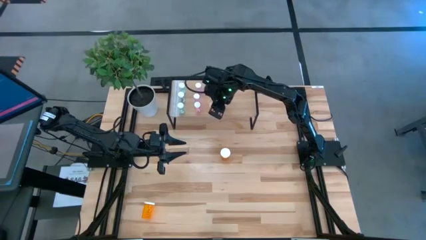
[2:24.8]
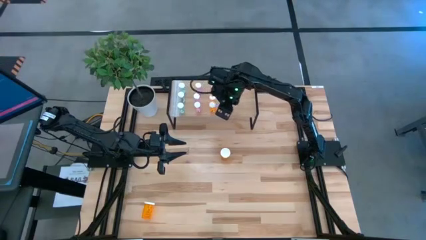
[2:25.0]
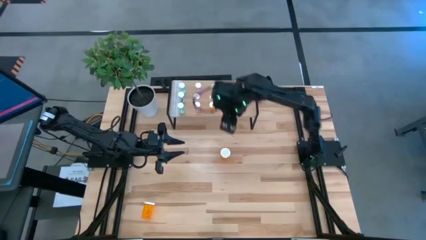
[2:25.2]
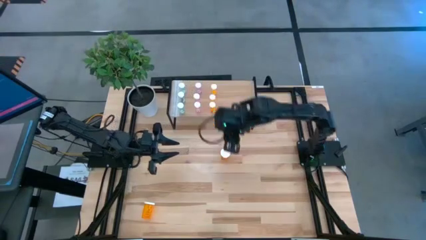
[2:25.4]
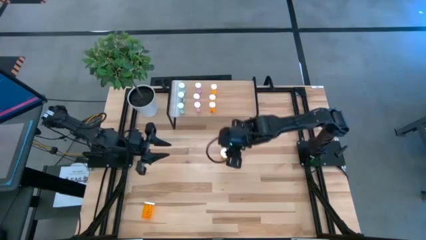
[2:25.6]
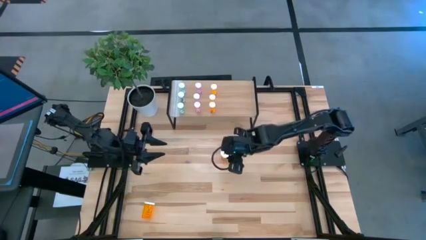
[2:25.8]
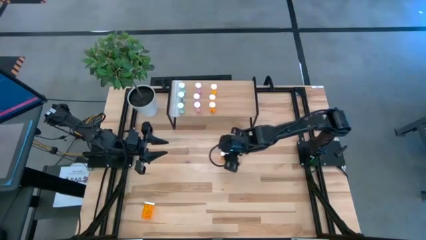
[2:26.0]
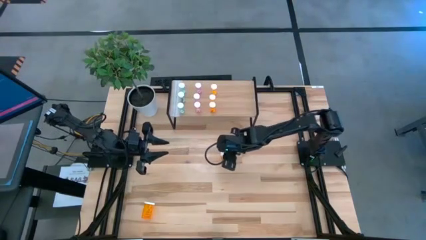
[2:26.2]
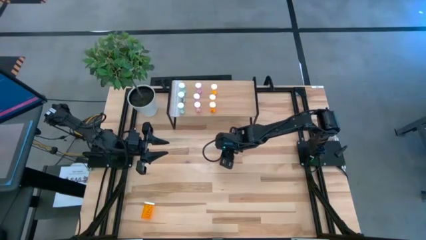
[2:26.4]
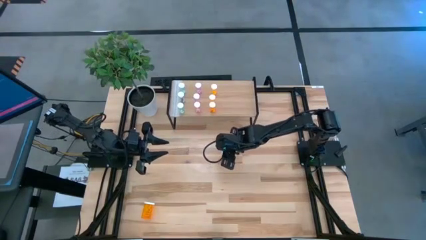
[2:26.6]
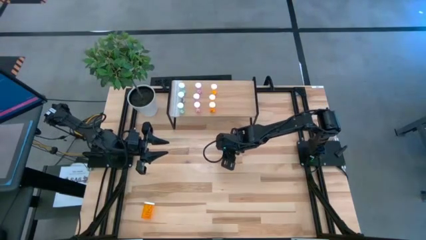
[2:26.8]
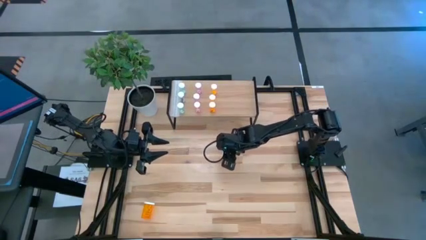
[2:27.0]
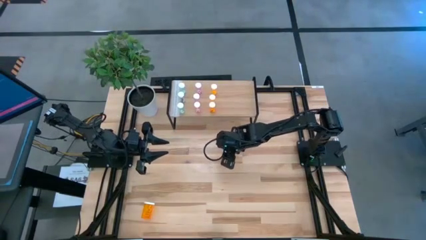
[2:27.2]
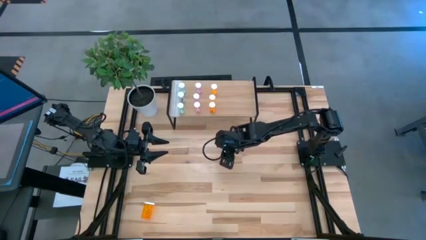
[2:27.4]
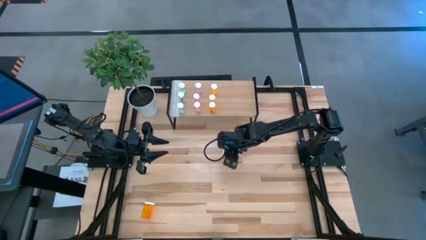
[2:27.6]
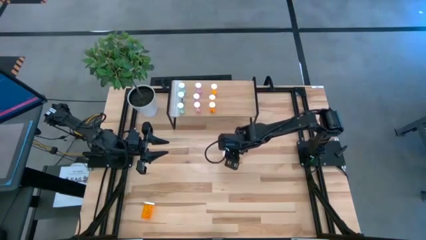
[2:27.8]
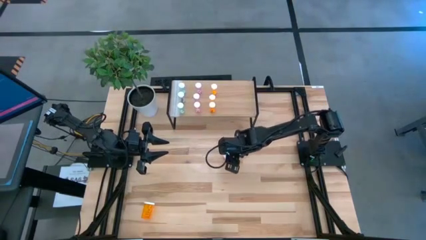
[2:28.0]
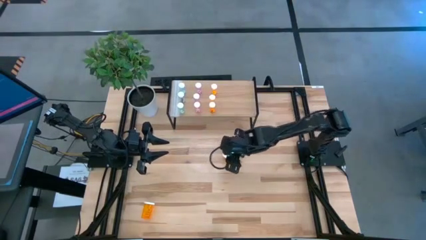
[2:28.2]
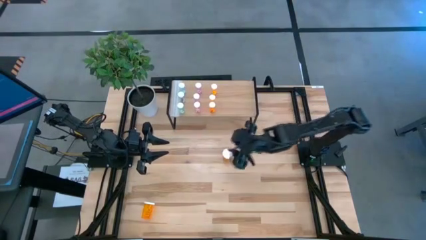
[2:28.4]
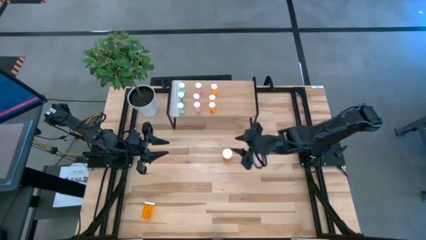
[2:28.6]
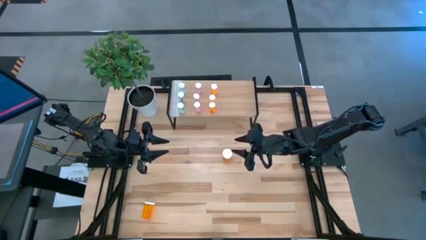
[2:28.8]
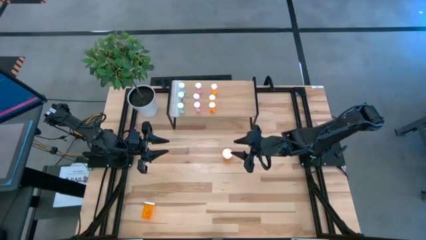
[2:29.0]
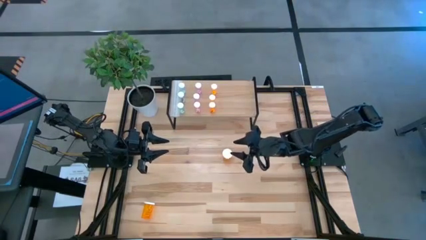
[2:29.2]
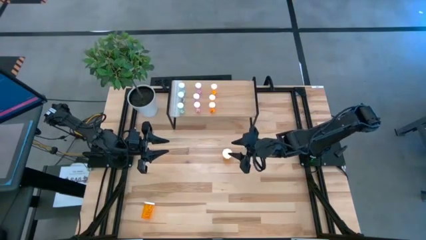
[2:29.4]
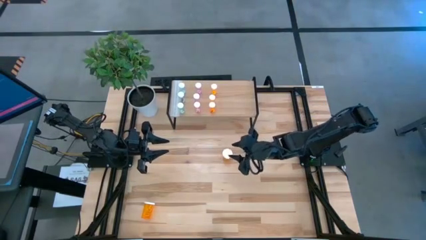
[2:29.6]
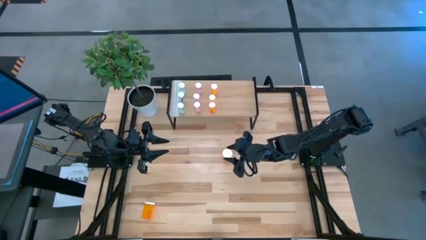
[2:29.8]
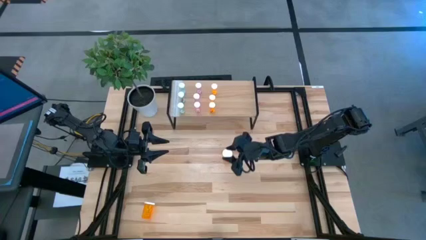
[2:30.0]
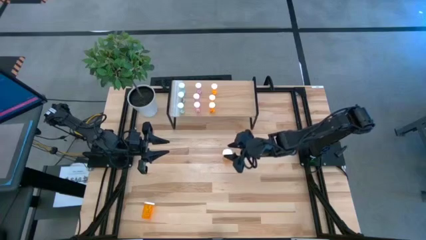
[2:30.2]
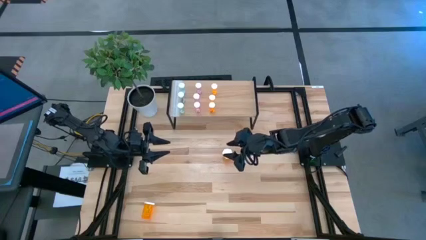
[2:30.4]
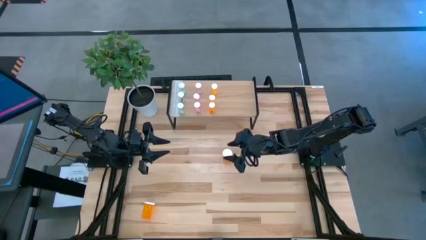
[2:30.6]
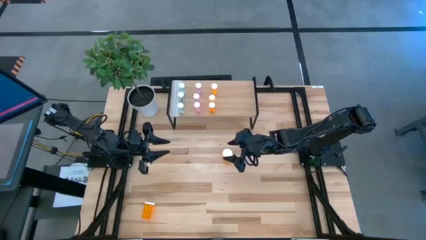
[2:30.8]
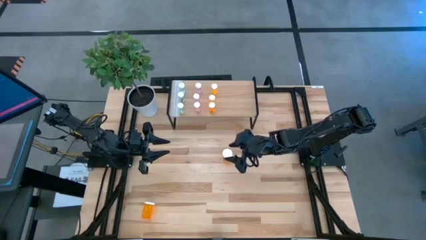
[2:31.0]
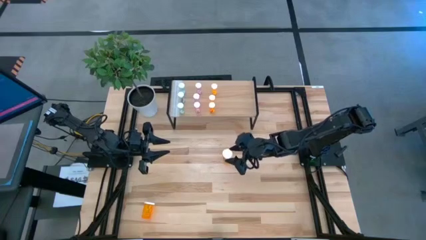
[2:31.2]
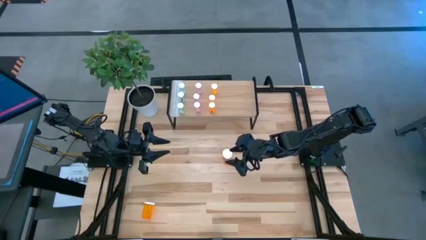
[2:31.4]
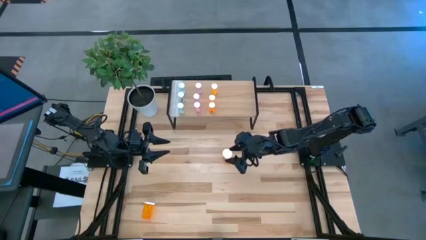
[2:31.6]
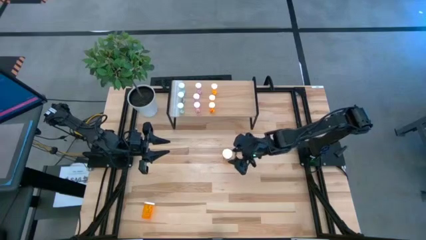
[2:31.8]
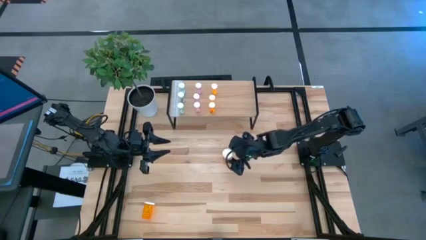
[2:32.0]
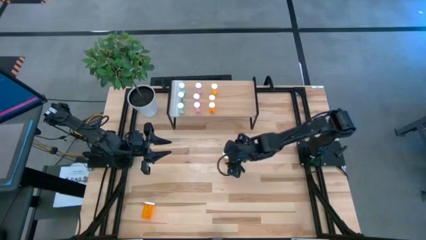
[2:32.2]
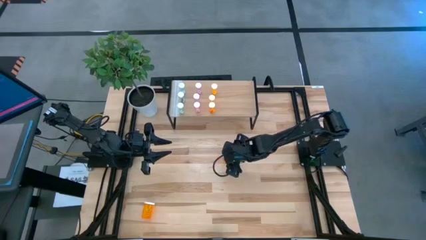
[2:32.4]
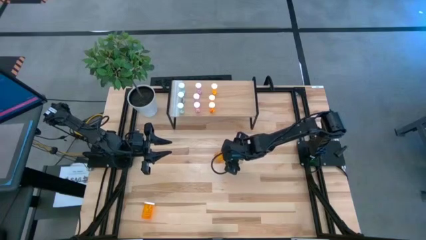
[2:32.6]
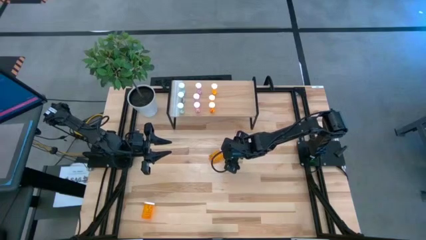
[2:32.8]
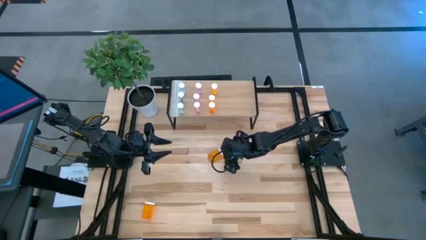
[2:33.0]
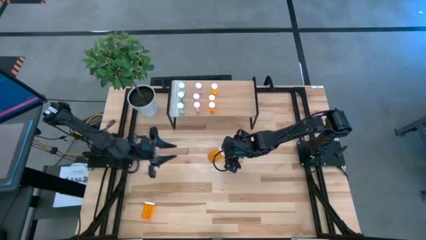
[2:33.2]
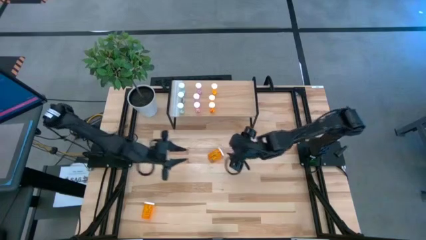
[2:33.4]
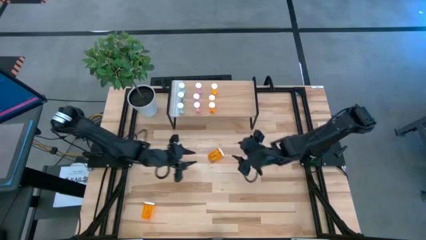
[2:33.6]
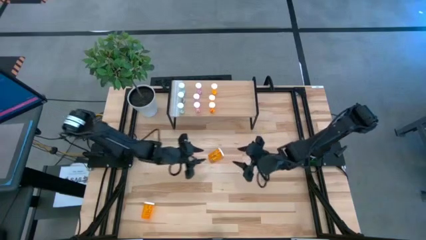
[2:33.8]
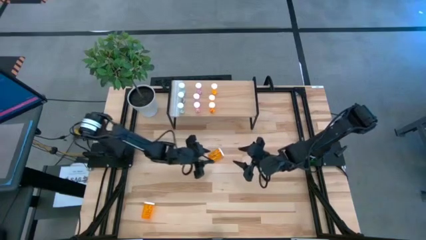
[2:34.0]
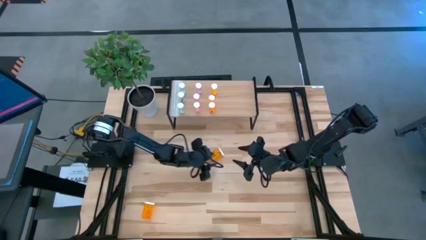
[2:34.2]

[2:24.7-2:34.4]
Task: Pick and place medicine bottles onto shelf by color
Put the top large orange pill bottle on the shelf

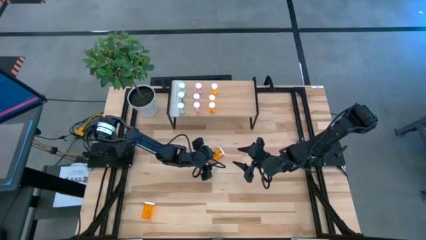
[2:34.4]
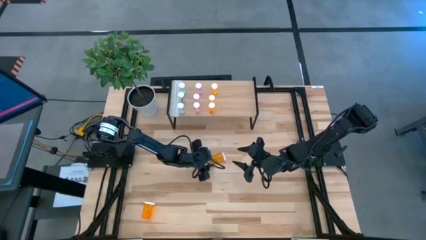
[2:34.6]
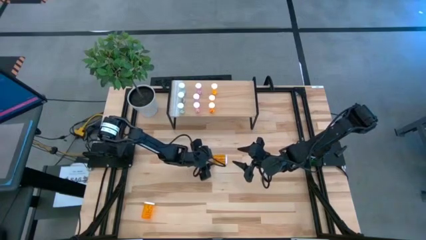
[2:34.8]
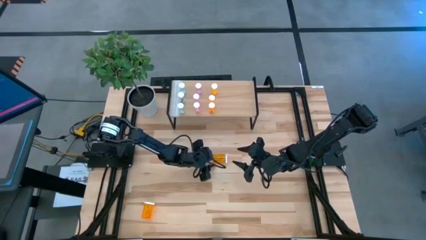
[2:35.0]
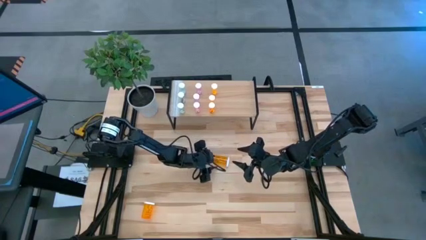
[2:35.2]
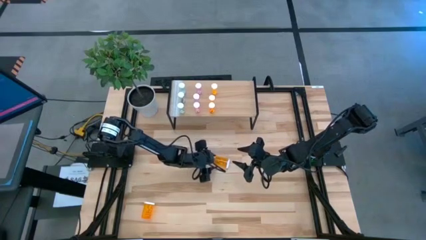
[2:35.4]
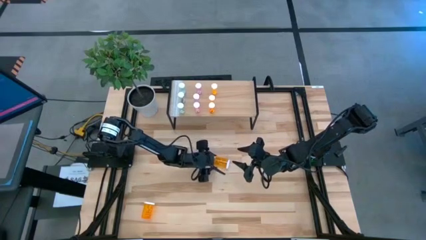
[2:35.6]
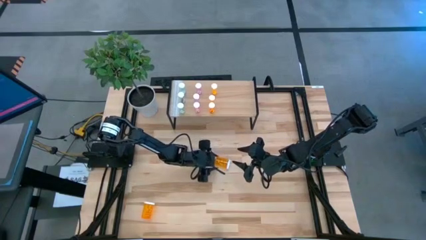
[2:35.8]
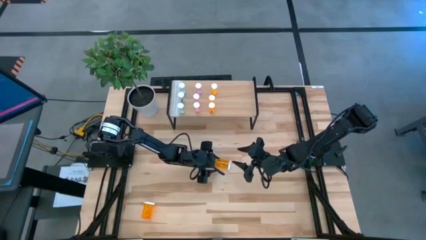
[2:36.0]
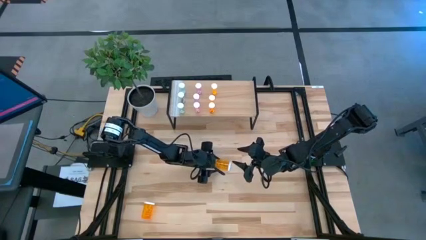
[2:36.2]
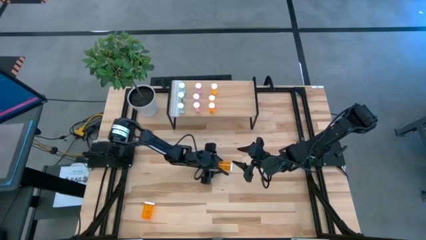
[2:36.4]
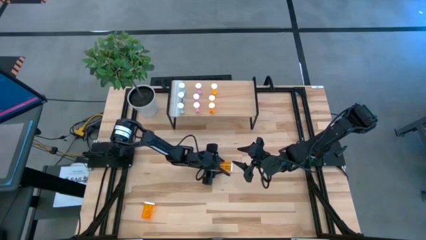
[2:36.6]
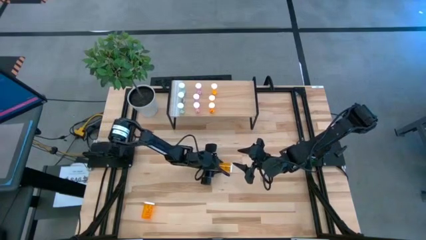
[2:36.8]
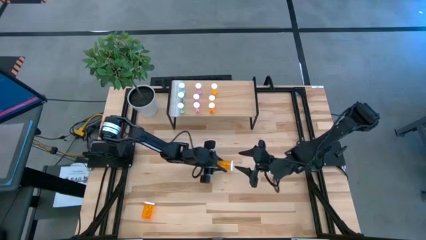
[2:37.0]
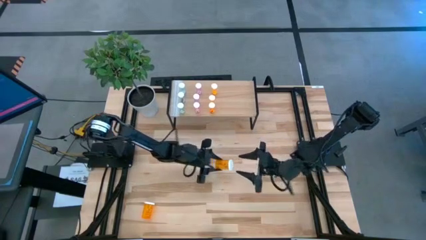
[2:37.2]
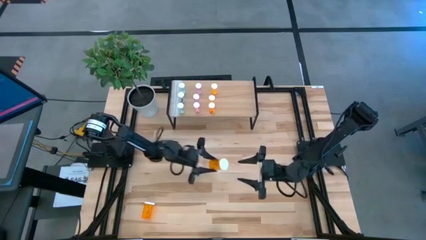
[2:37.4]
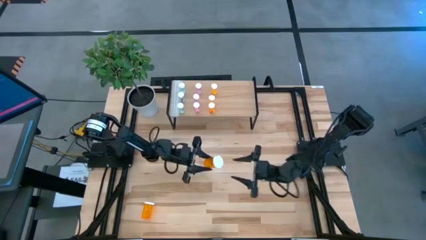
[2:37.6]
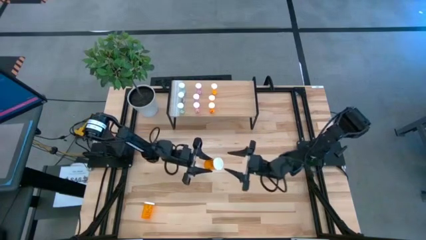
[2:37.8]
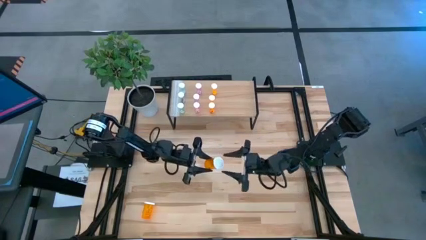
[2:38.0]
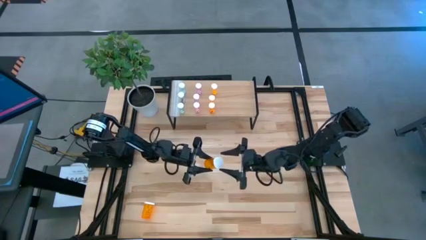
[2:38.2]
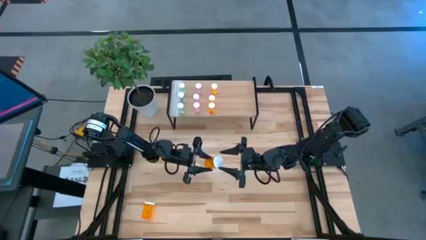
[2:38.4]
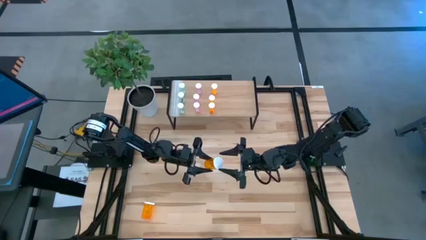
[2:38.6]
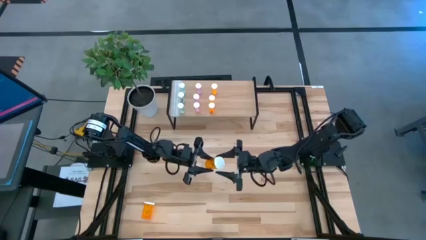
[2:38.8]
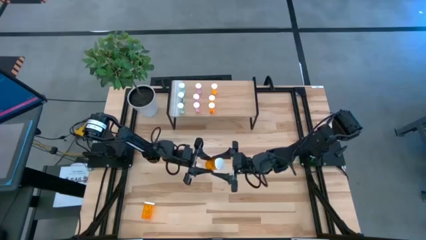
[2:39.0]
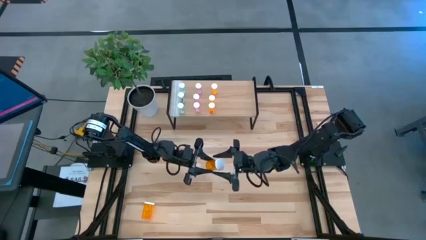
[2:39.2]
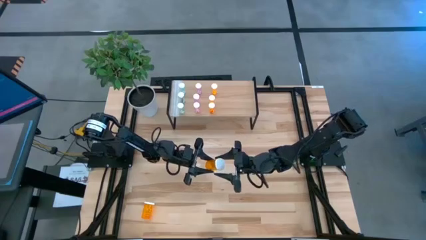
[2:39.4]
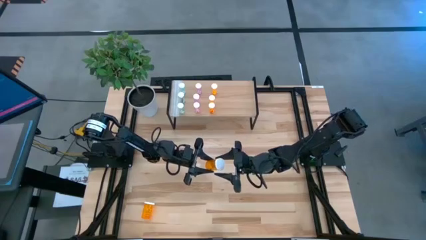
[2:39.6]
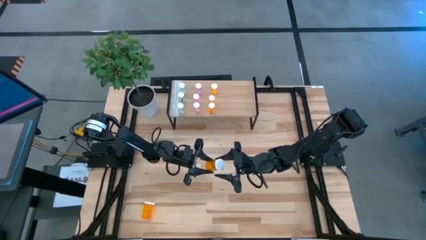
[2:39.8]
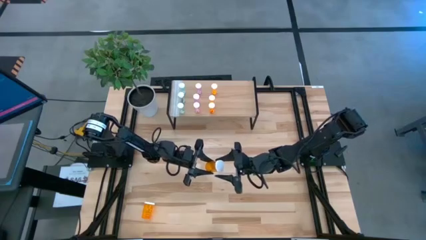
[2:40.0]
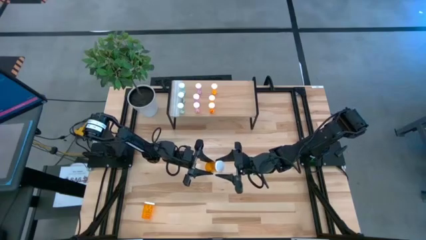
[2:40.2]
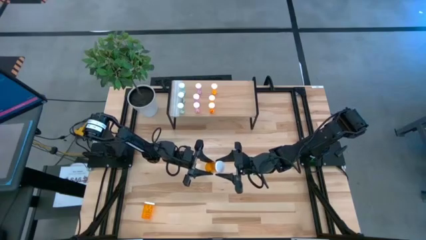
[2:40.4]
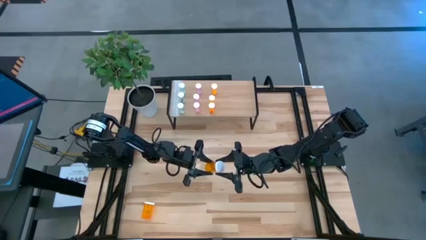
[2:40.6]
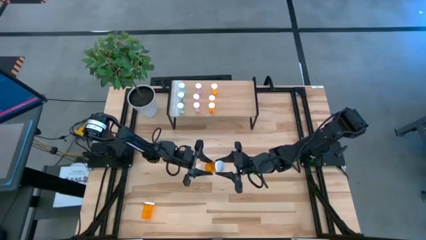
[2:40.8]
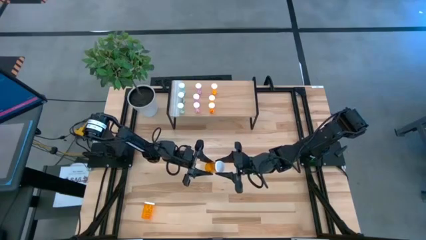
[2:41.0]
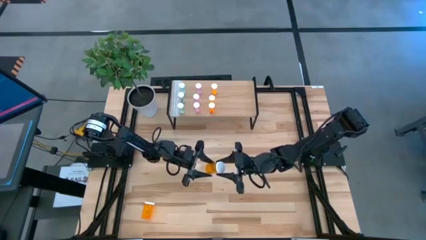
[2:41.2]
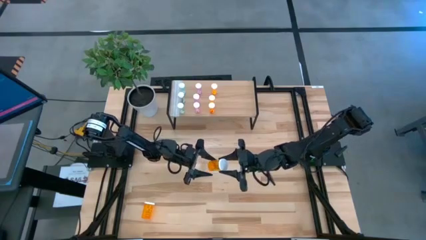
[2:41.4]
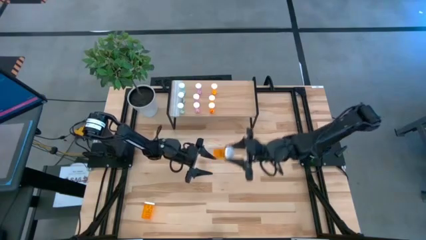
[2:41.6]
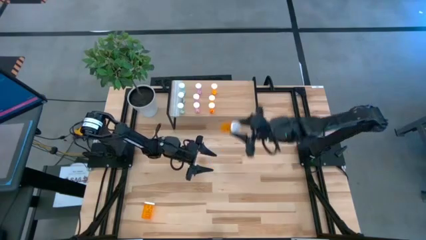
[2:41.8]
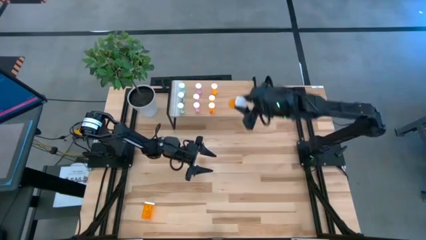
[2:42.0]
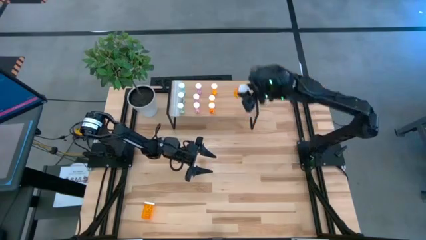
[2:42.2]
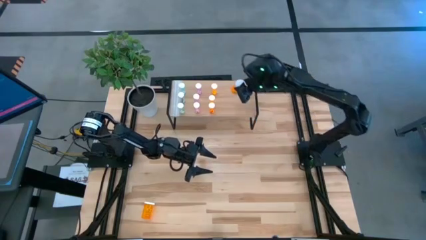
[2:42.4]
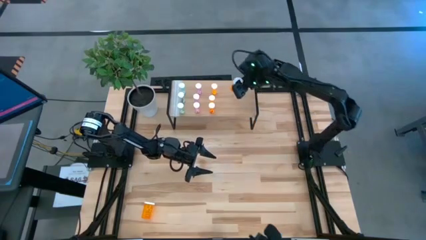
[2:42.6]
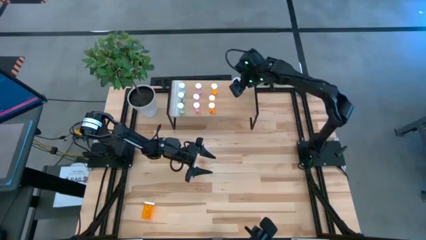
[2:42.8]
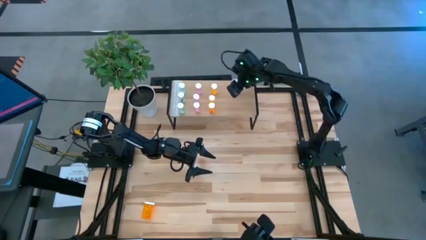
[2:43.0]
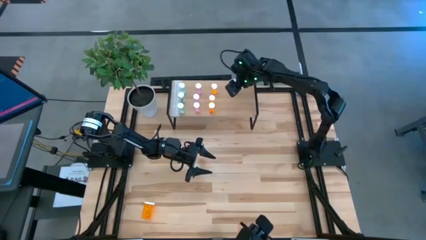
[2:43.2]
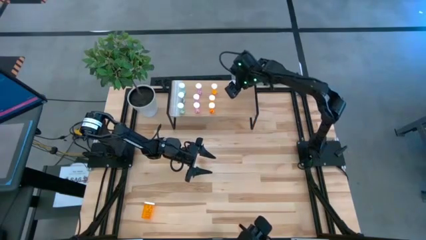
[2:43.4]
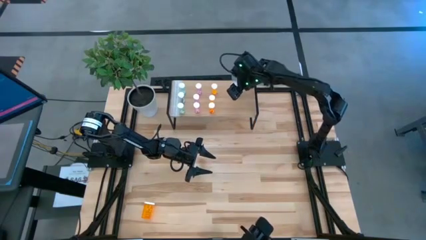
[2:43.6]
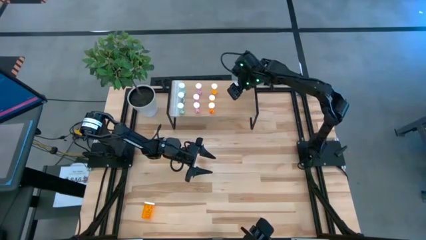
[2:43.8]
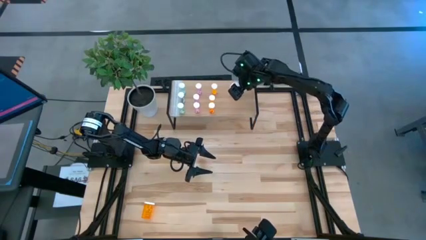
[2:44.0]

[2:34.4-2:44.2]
Put the top large orange pill bottle on the shelf
